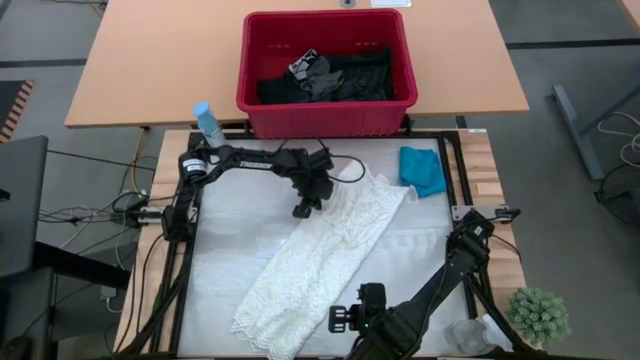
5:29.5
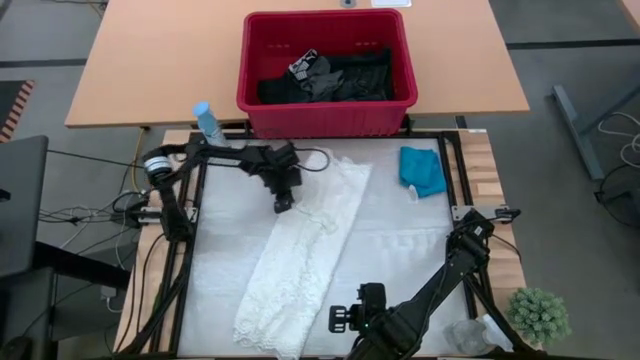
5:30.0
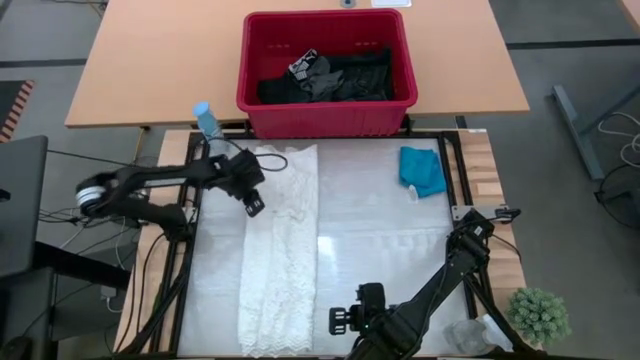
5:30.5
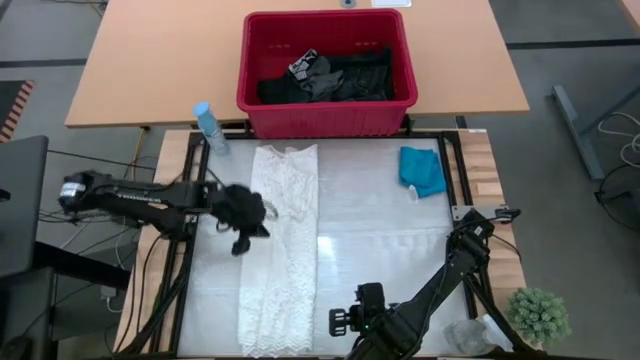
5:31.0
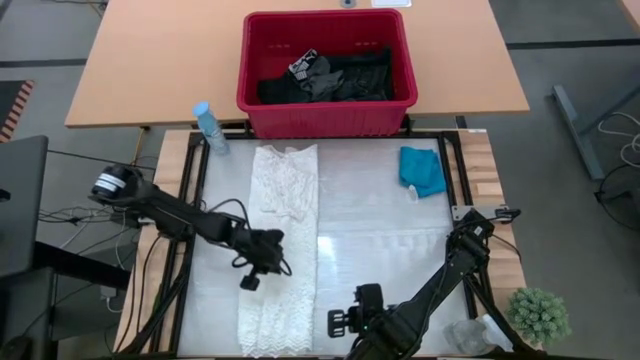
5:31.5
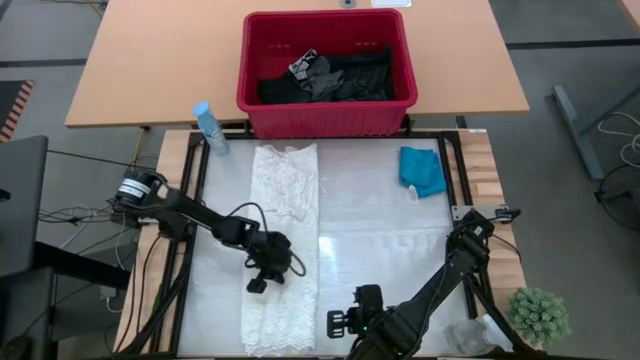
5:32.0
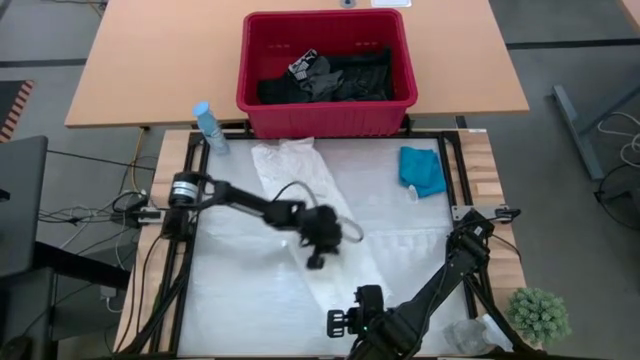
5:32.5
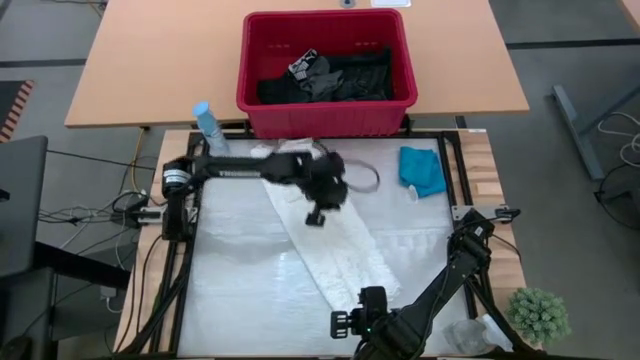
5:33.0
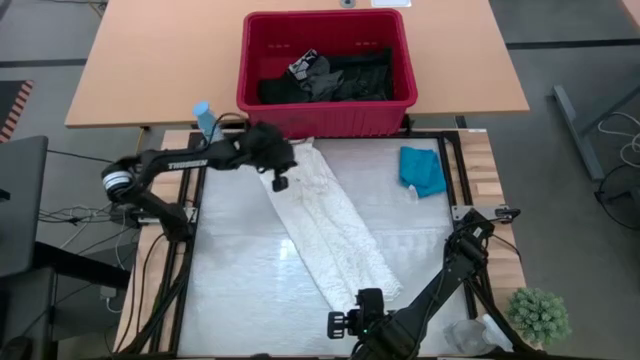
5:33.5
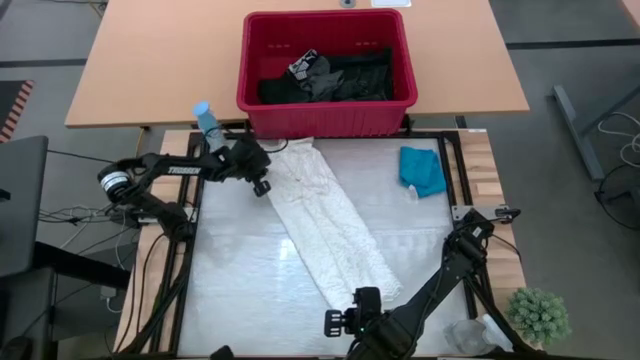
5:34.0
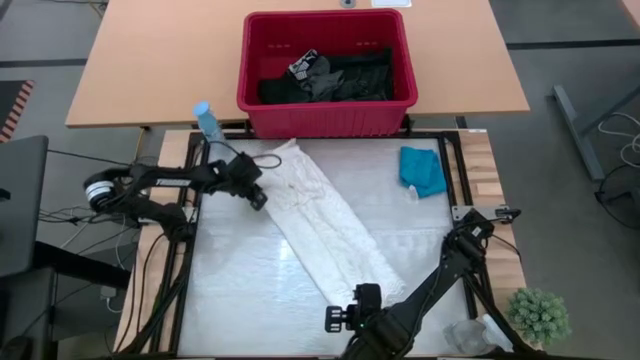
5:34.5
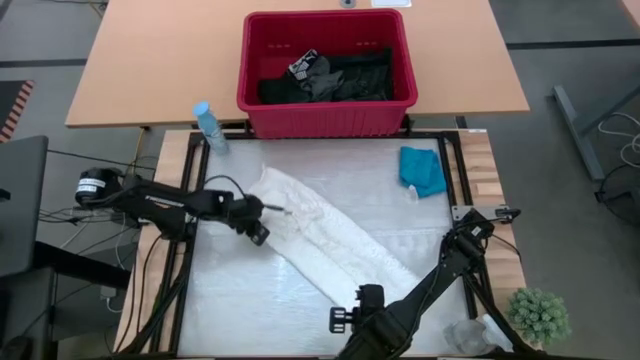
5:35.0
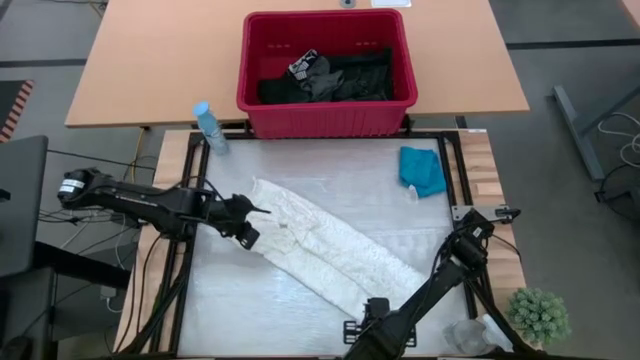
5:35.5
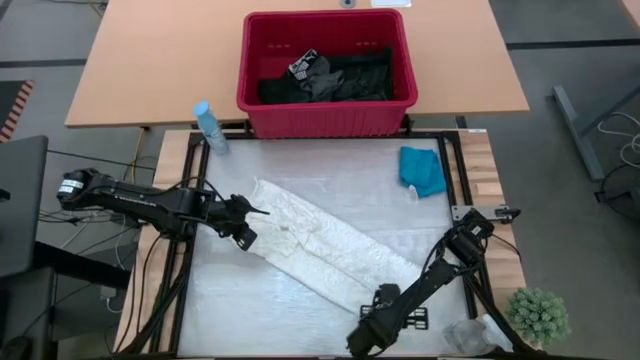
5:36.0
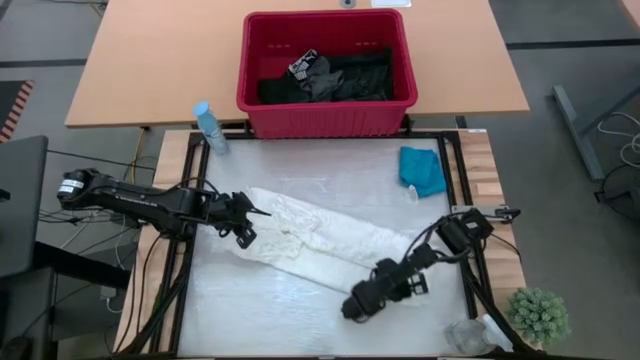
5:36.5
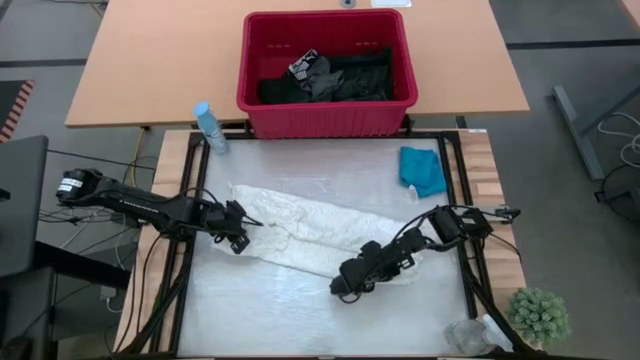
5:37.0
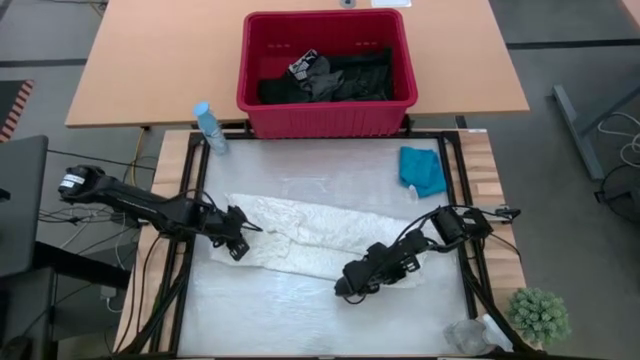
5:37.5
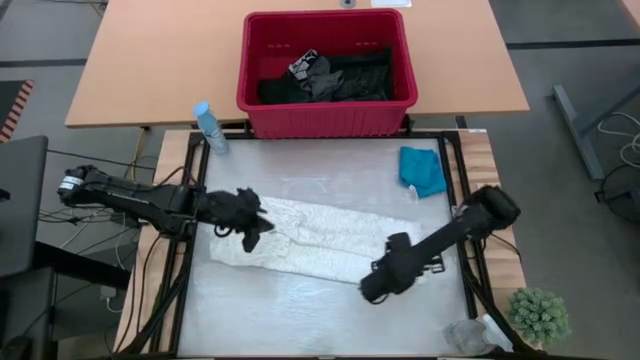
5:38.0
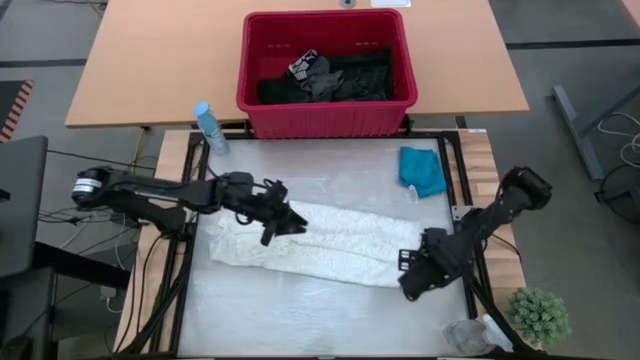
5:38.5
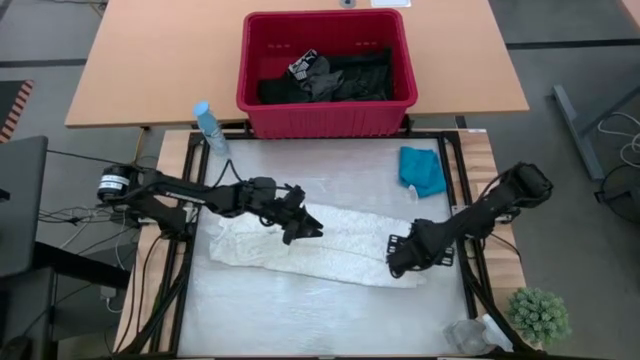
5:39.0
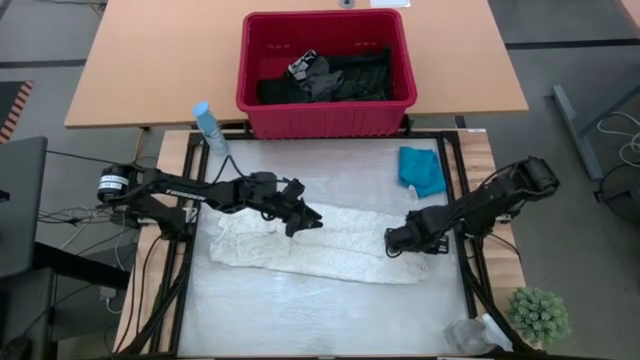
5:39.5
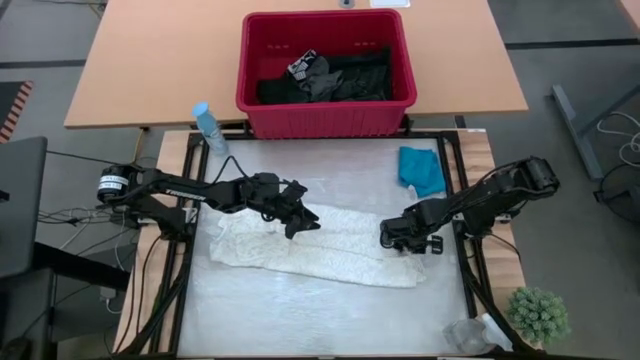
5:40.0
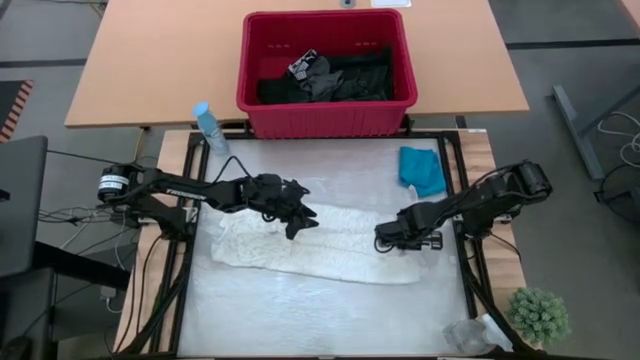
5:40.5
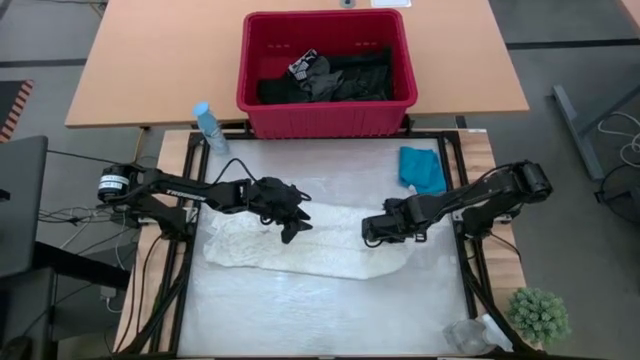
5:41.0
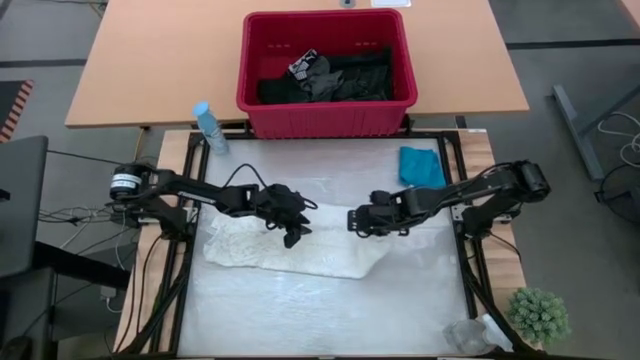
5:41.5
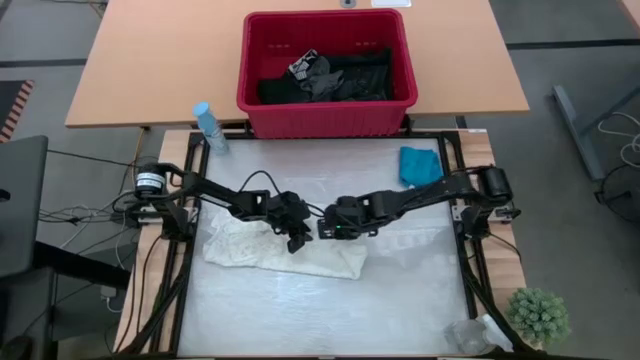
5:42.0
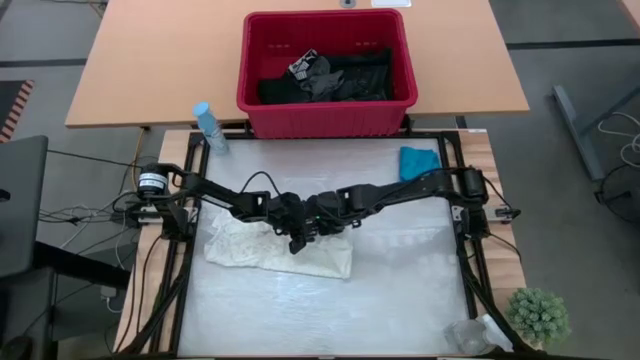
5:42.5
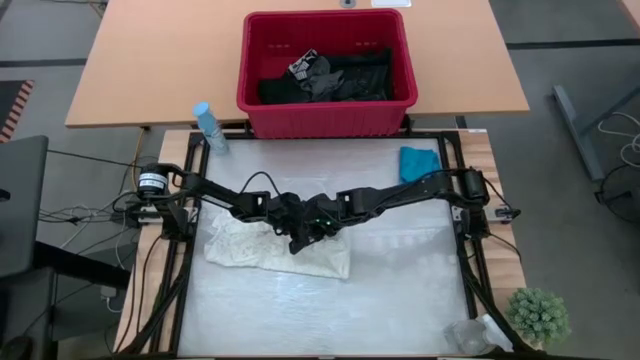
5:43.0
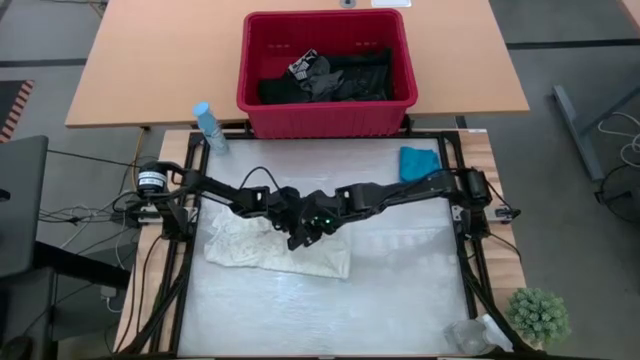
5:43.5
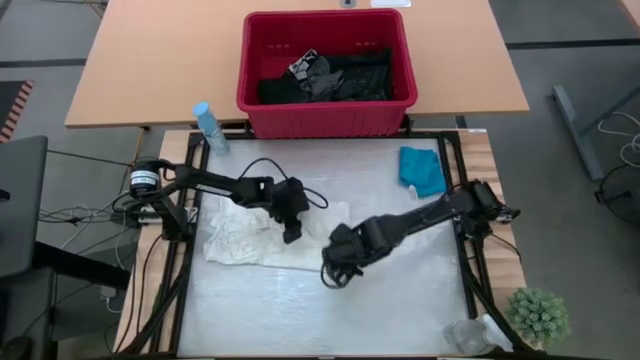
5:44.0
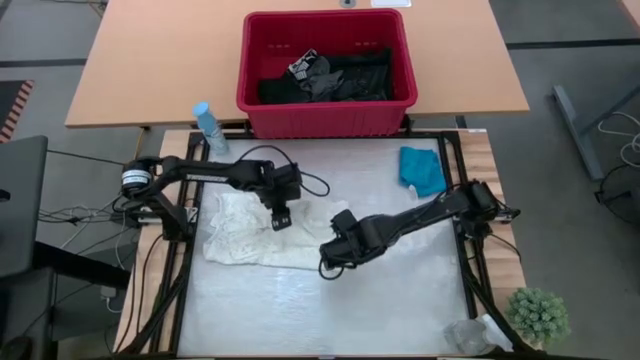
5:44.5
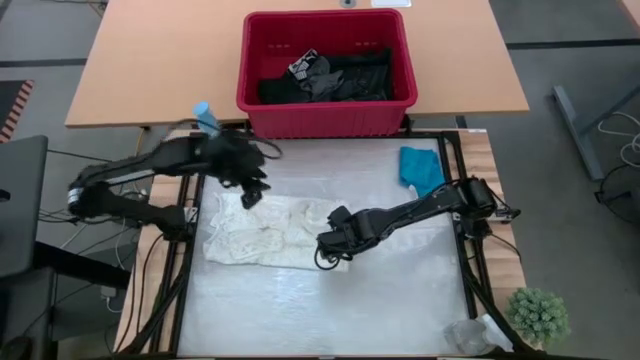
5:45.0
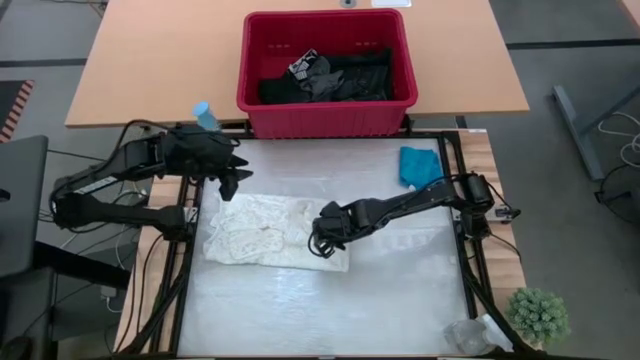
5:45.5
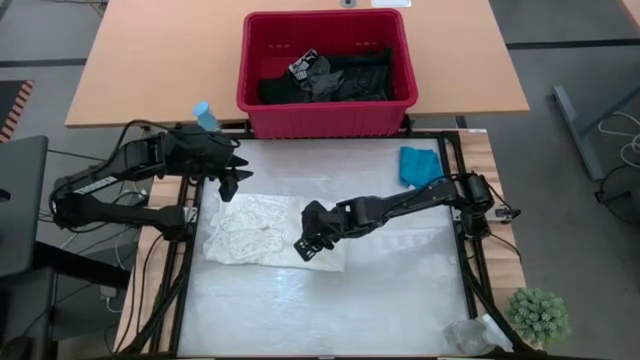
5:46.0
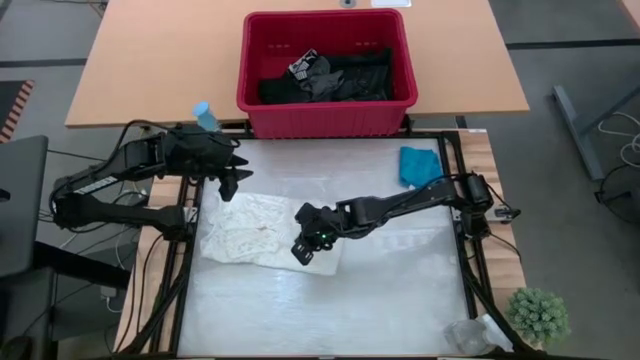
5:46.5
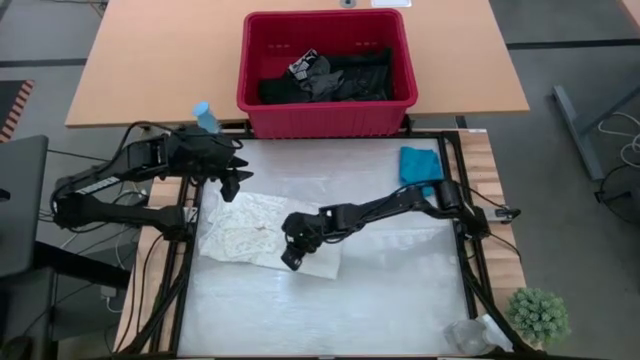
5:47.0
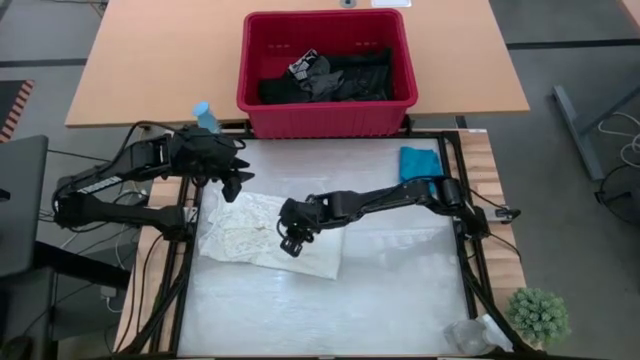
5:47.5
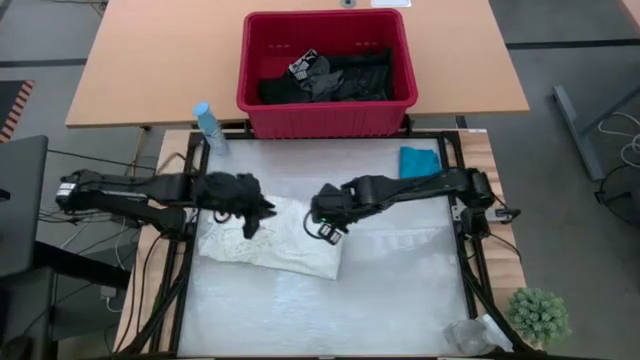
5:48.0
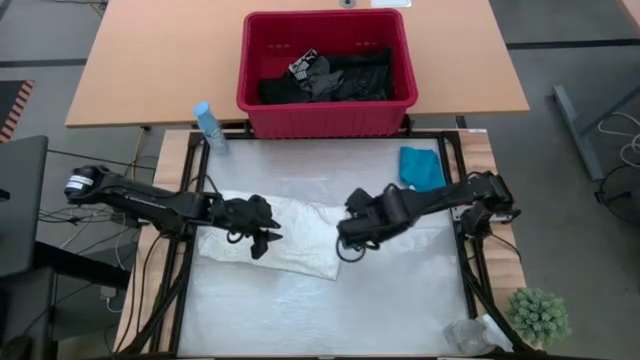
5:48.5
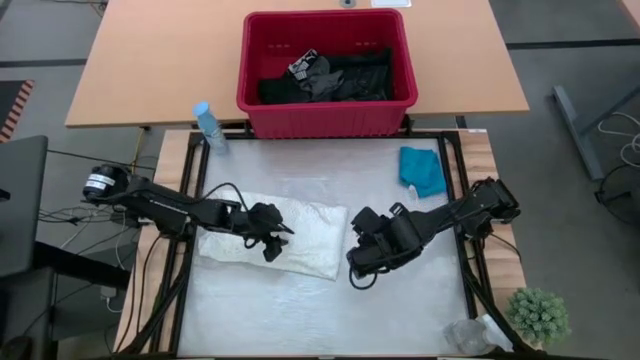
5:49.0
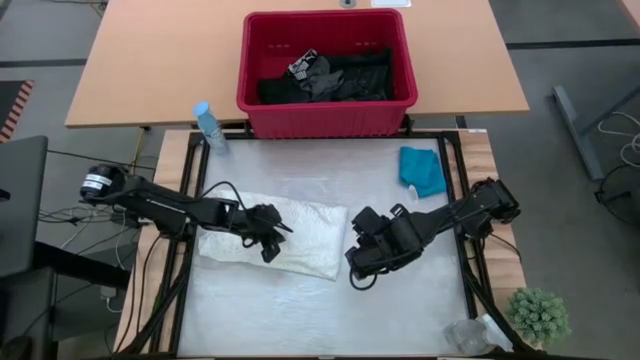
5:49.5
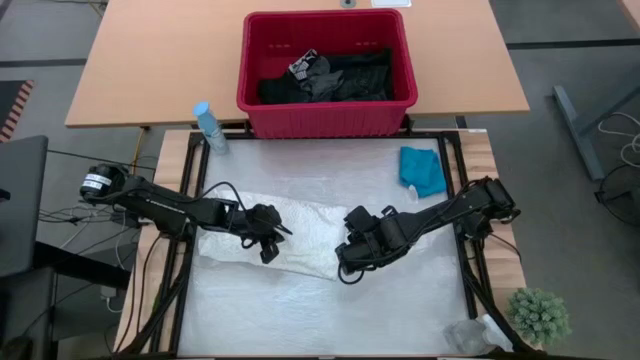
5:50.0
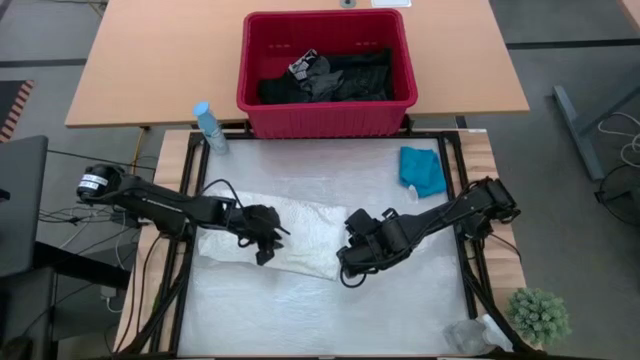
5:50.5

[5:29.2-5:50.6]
Task: Fold laundry
Fold the white shirt

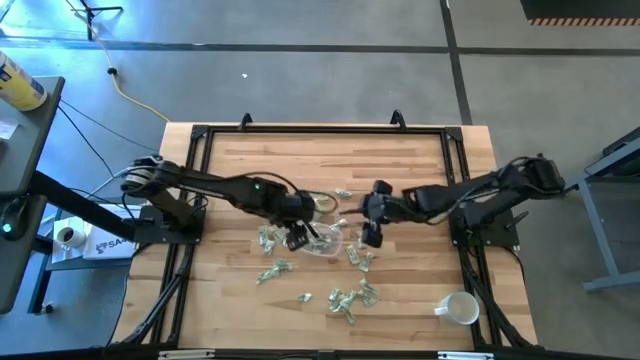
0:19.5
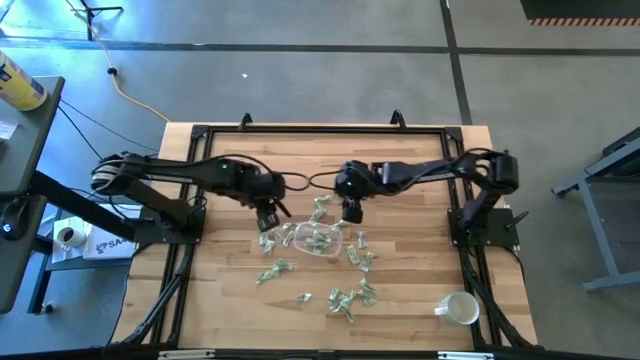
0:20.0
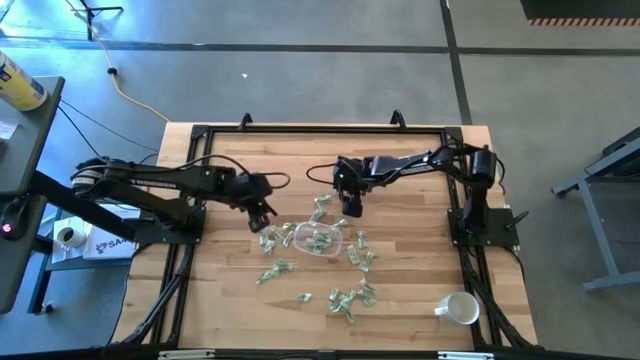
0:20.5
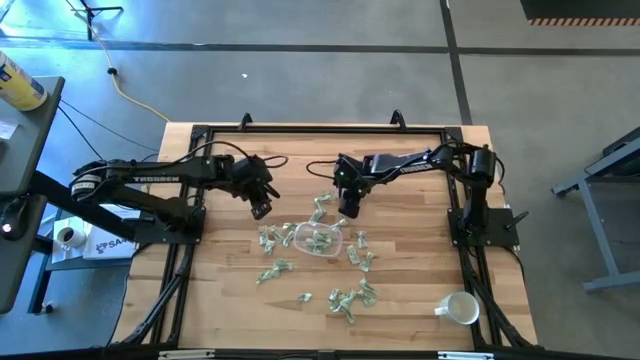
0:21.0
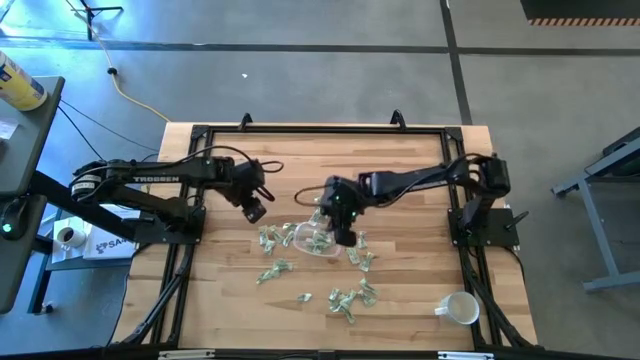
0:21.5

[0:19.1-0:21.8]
Task: Pick and place Stevia / Truvia into bins
Put the green stevia packet into the transparent bin
